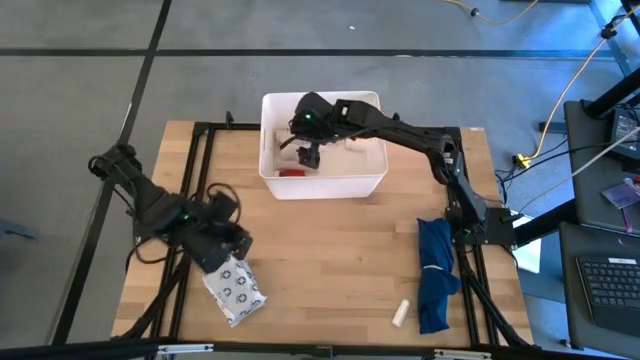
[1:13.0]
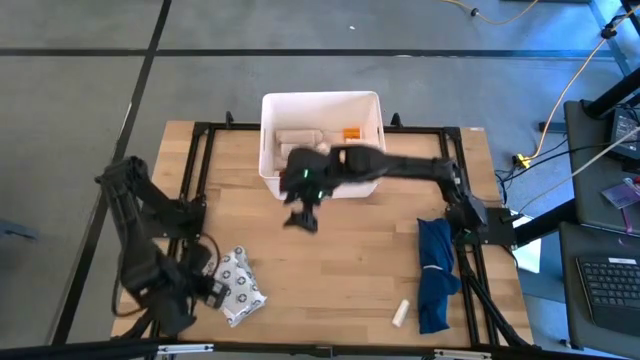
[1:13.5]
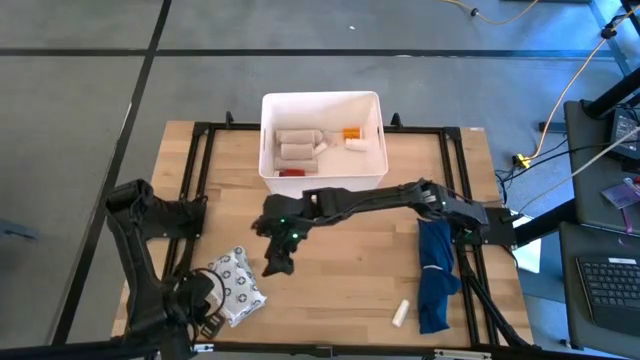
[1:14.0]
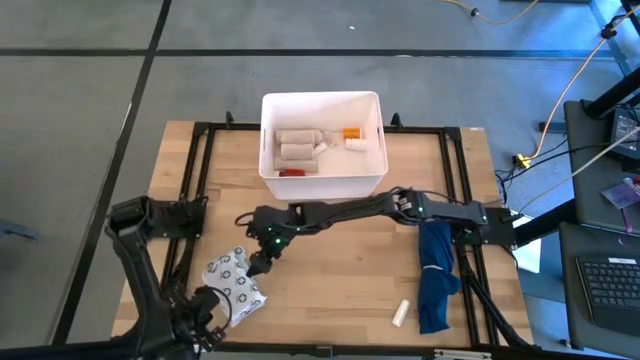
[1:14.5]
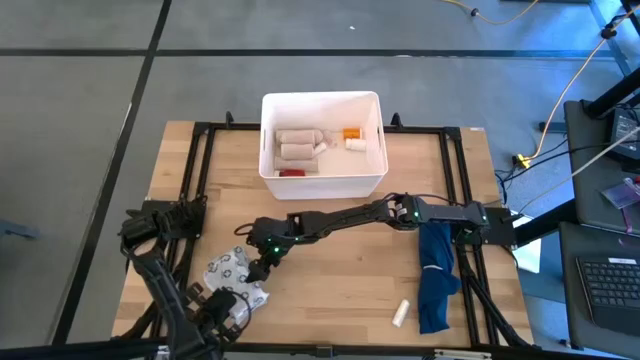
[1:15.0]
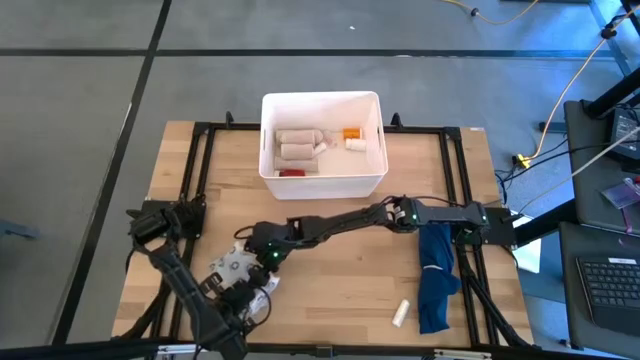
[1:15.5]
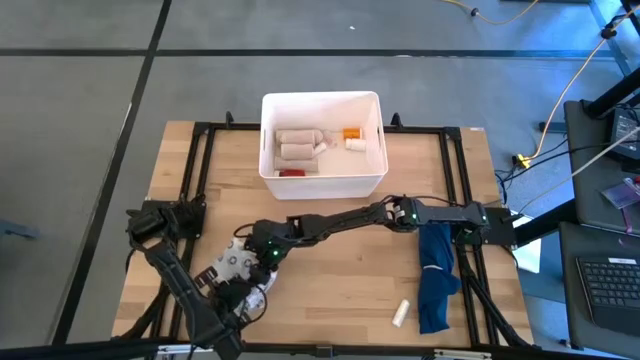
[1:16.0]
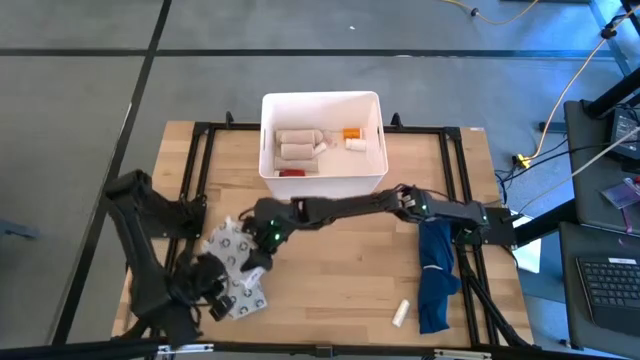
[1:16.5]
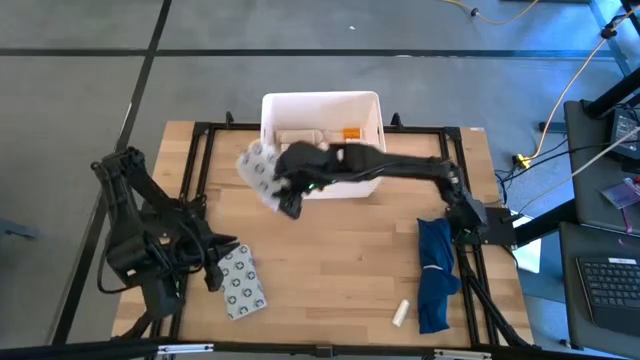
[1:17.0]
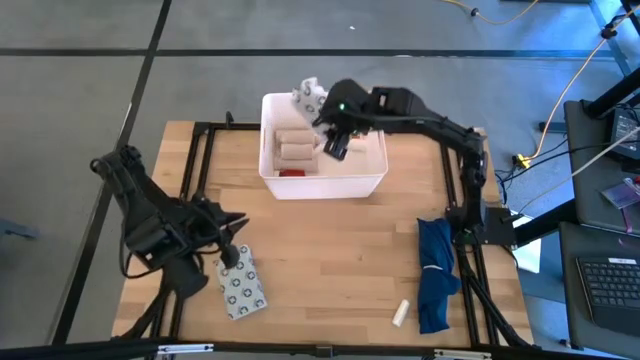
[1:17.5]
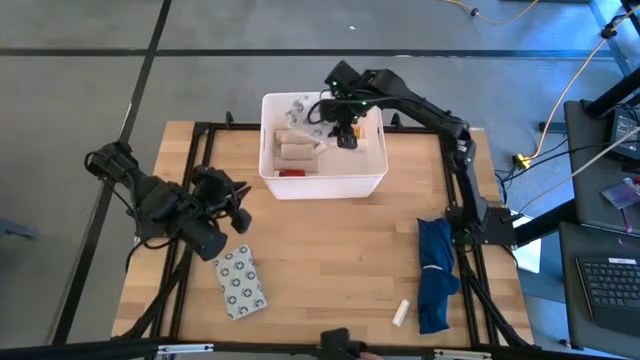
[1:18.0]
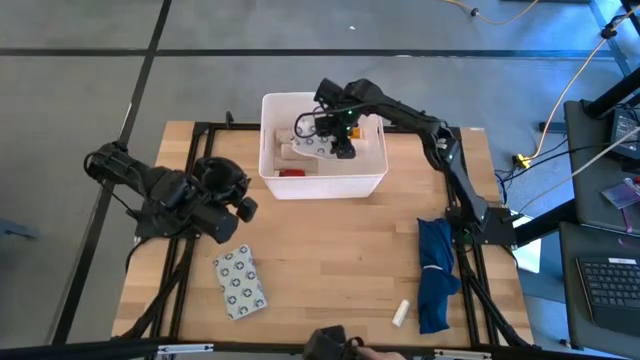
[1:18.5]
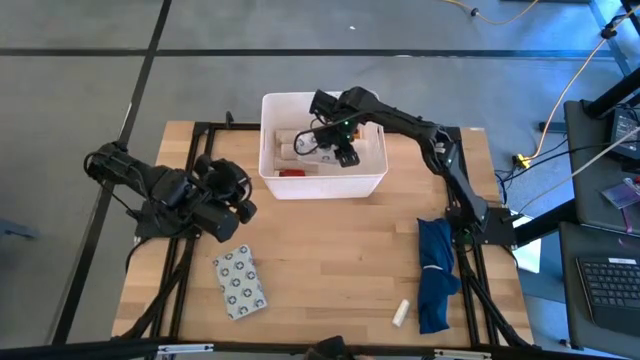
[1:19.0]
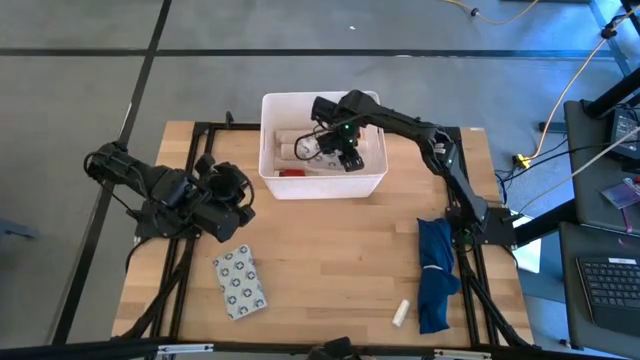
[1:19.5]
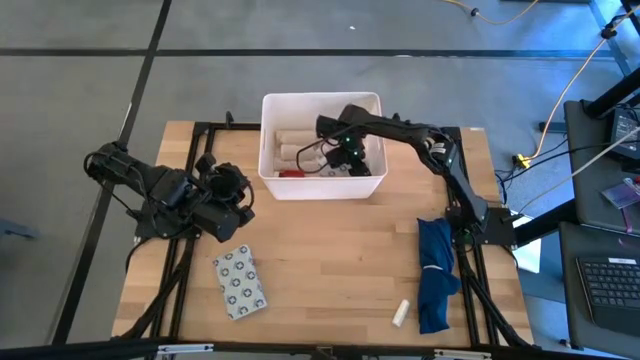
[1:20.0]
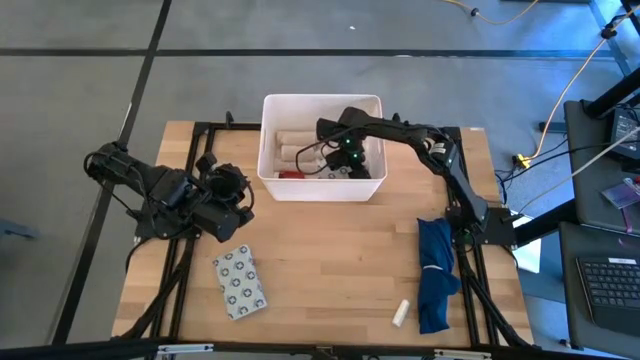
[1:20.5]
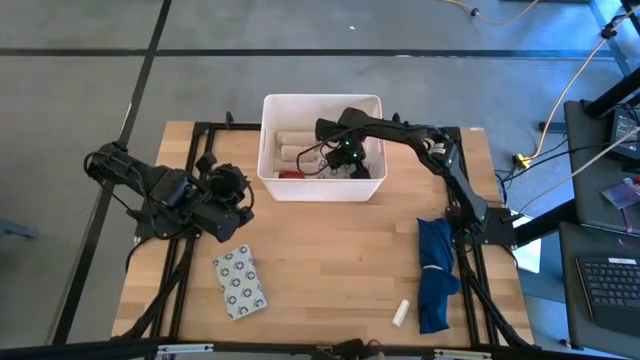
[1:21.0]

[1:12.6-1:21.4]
Task: Pick & place medical supplies in basket/bin
Put the white mailer bag into the white bin

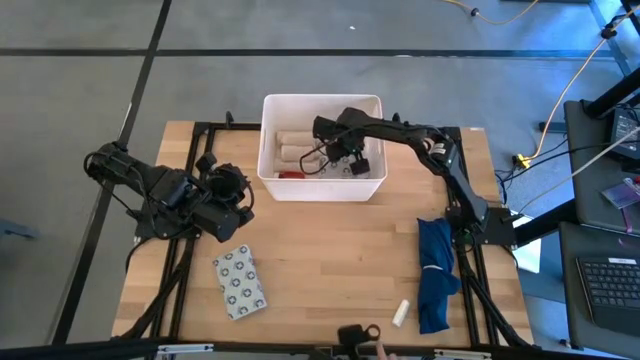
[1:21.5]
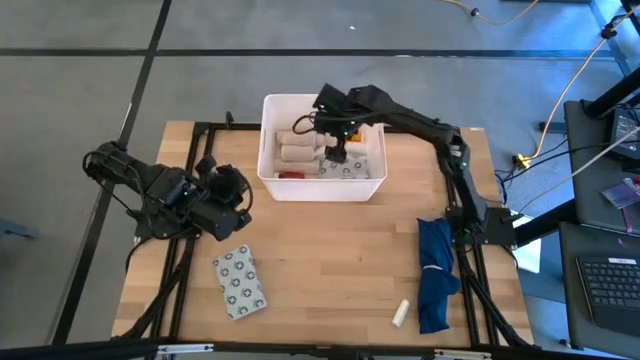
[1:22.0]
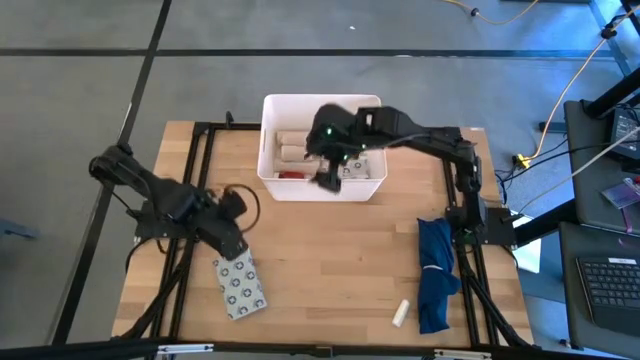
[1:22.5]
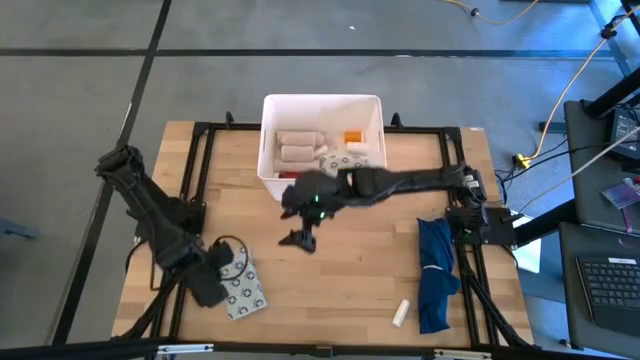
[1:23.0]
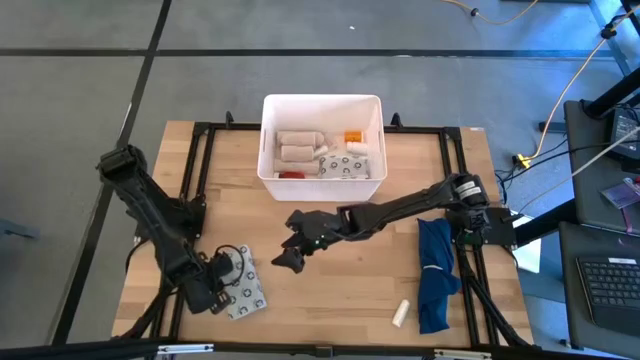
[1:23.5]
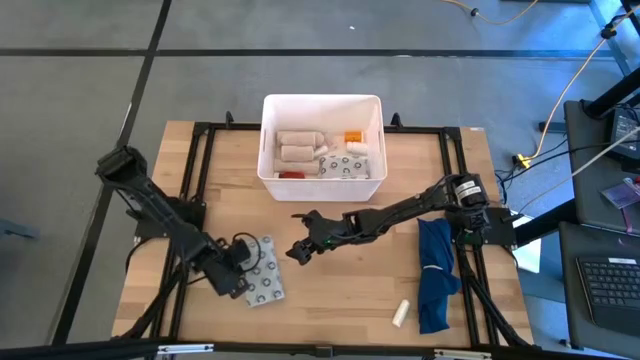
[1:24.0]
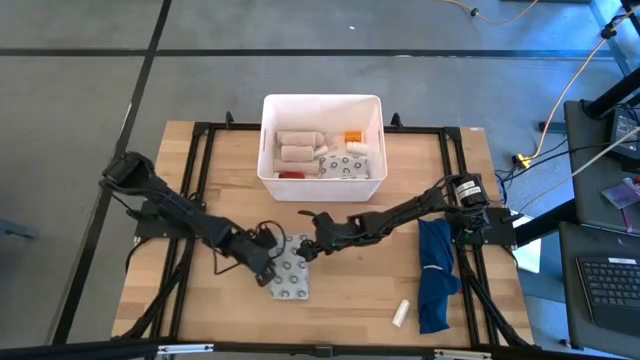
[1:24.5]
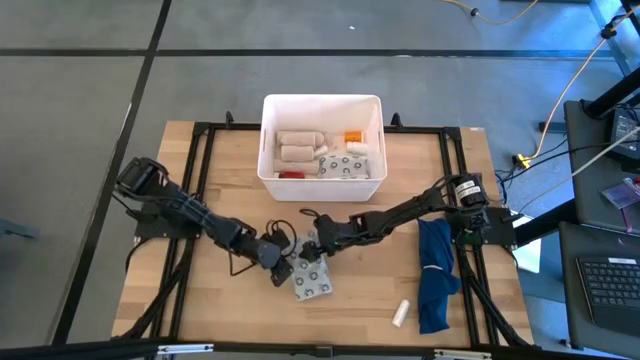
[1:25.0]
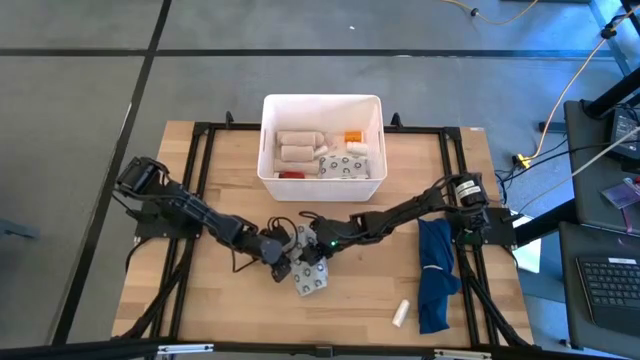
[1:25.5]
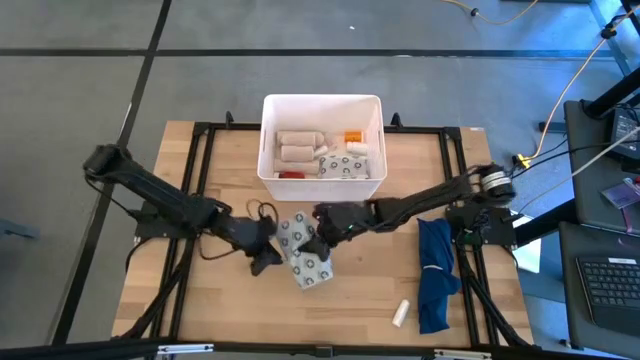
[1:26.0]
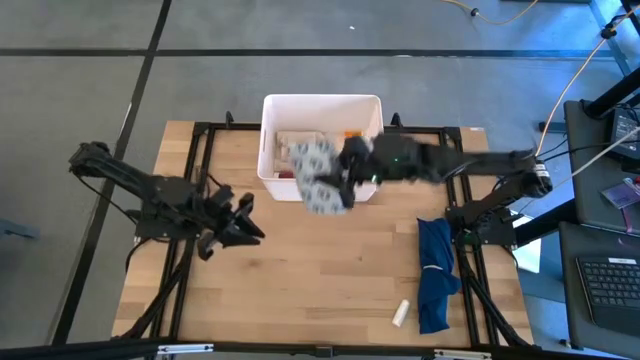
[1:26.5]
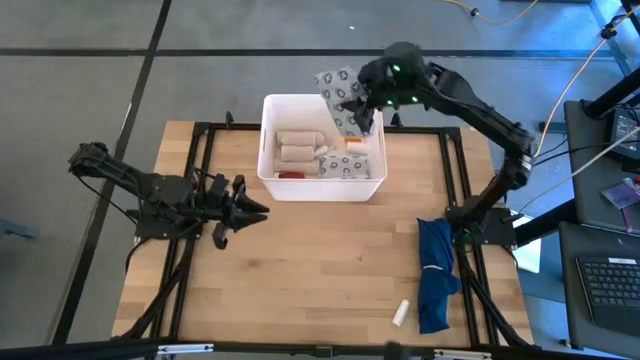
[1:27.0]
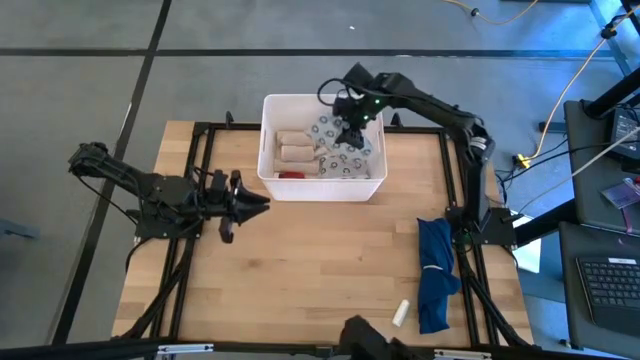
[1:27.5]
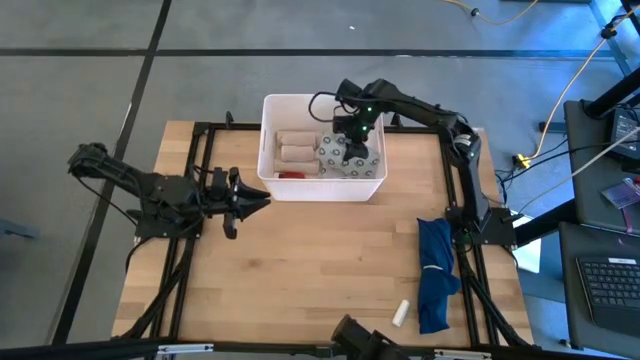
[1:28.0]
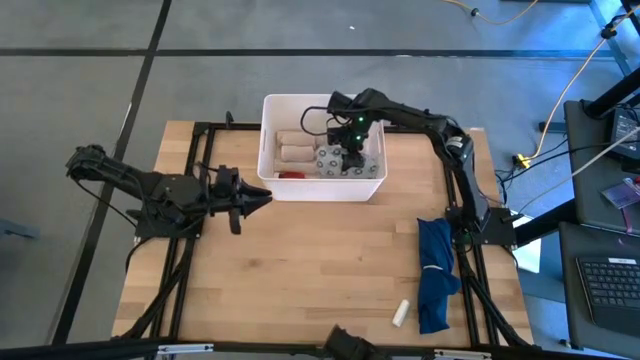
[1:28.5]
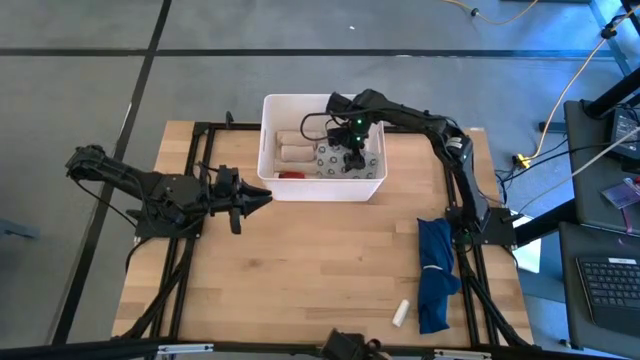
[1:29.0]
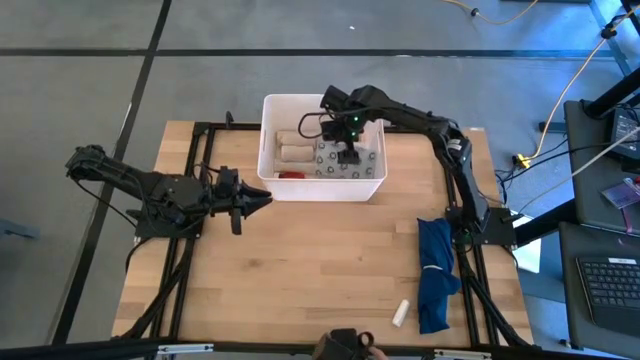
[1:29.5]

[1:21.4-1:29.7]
Put the white mailer bag into the white bin

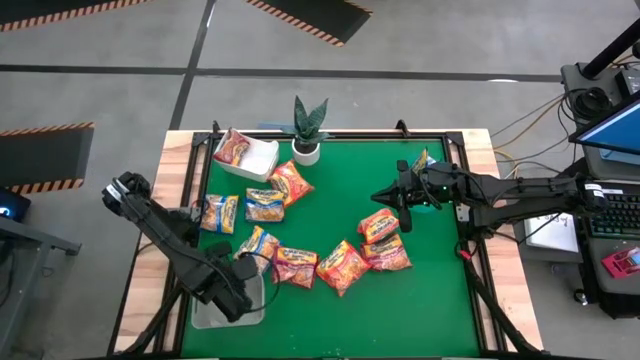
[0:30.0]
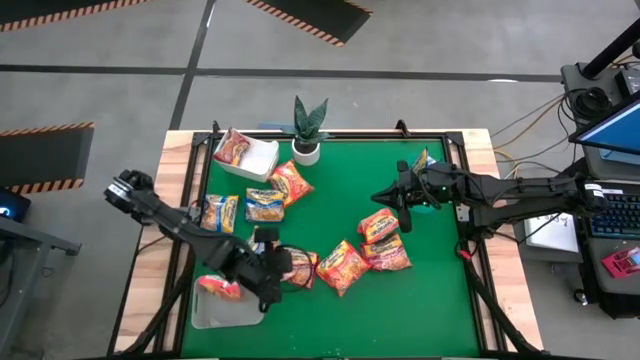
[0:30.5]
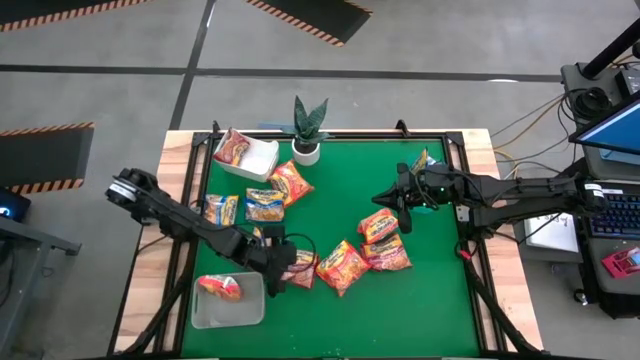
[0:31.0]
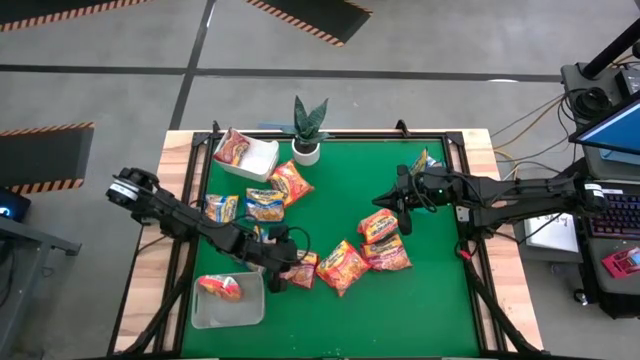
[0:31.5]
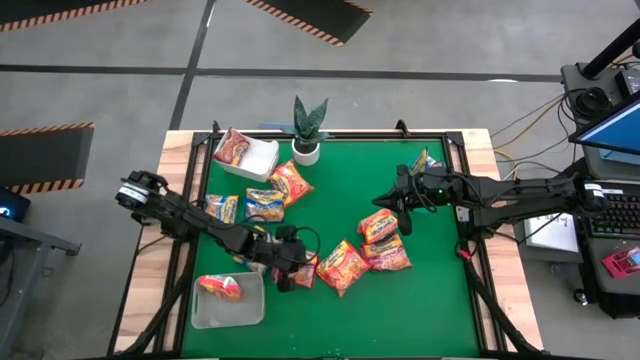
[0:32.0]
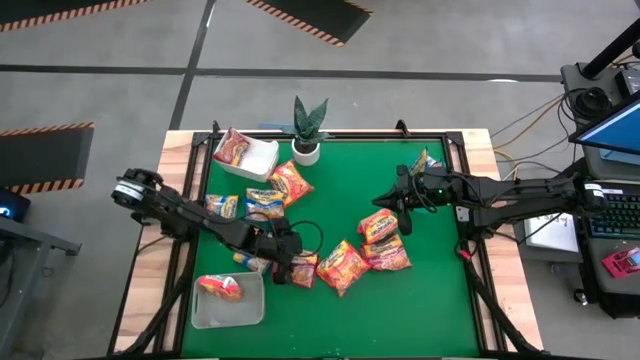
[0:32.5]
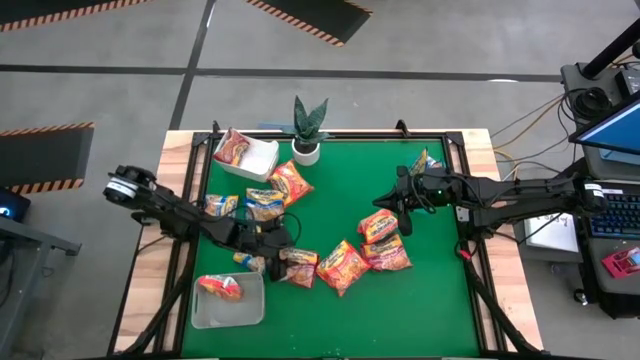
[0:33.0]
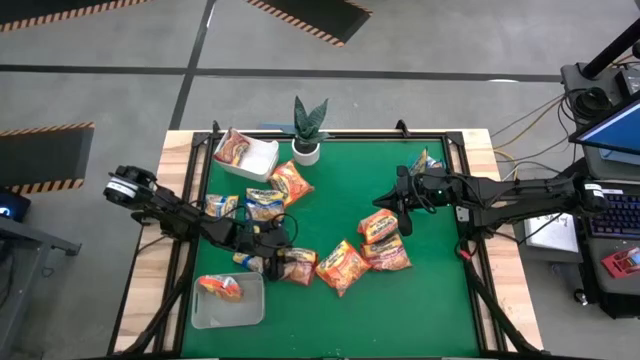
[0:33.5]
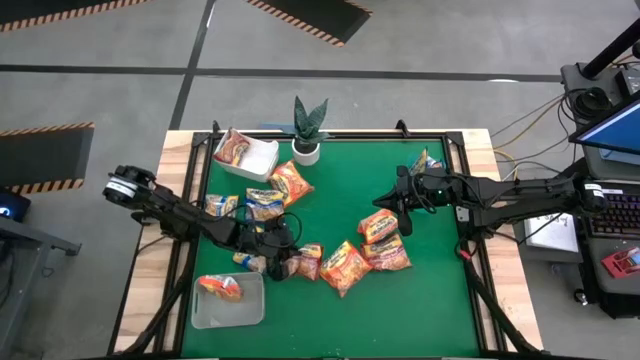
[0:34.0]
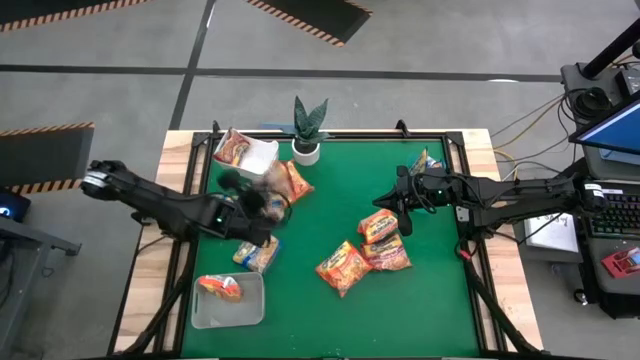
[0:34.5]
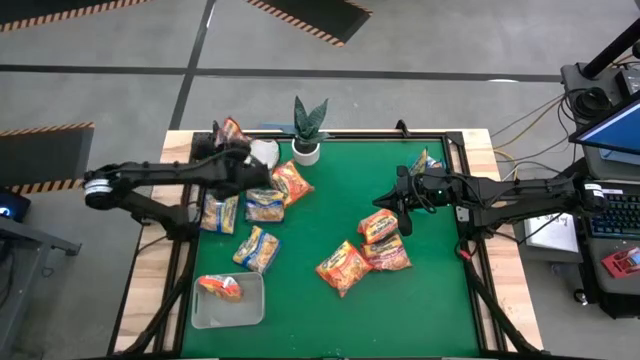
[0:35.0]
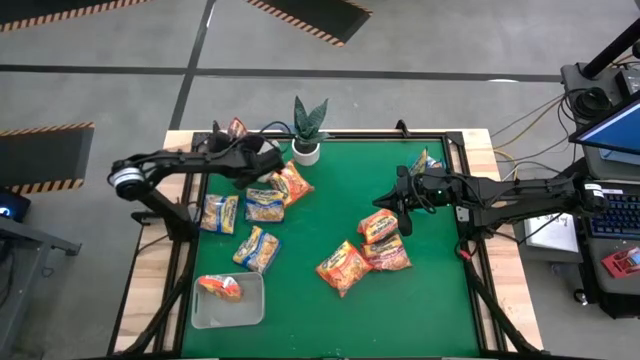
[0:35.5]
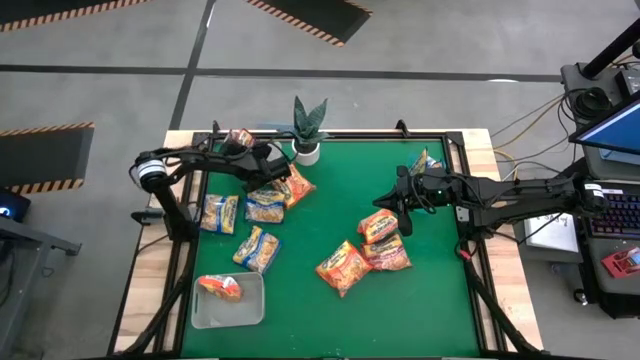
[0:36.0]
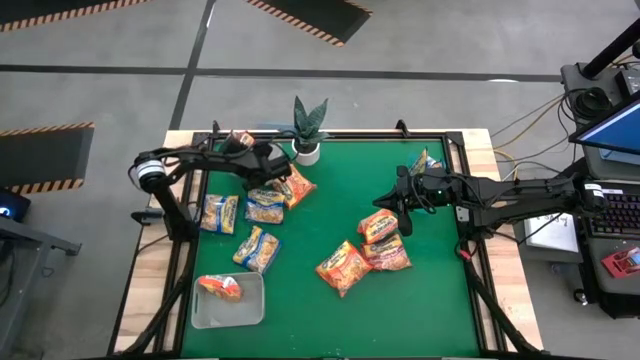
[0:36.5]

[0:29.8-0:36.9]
Task: Sort Maruchan noodles
Put the red noodle pack into the white bin
